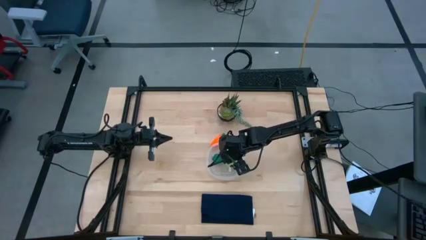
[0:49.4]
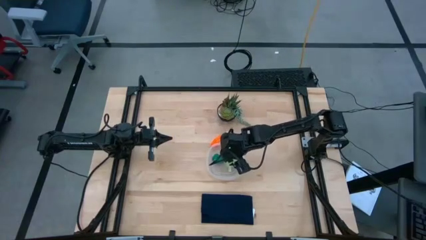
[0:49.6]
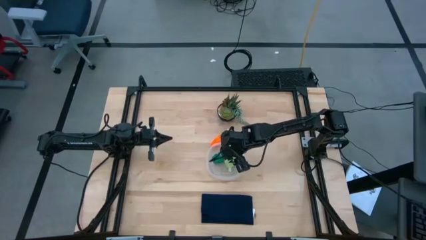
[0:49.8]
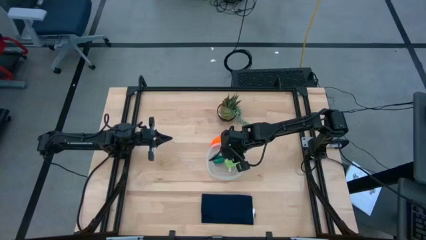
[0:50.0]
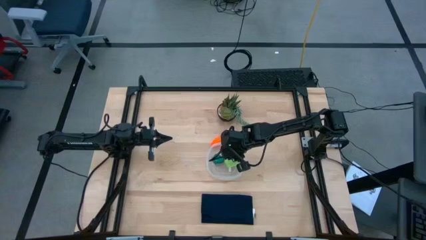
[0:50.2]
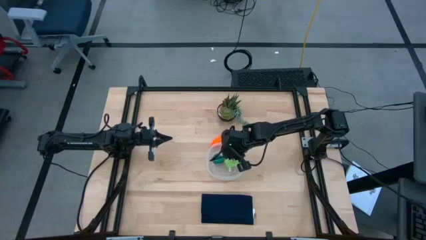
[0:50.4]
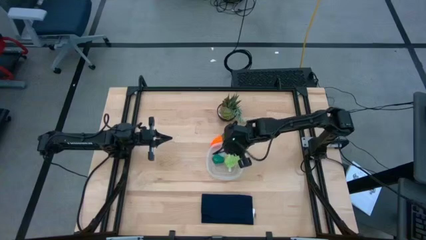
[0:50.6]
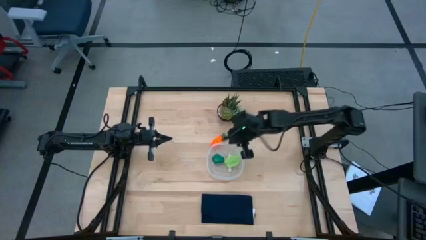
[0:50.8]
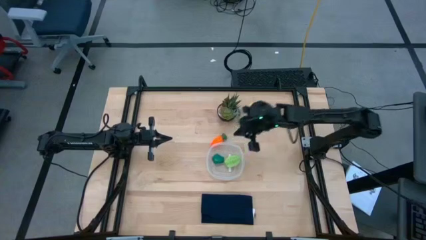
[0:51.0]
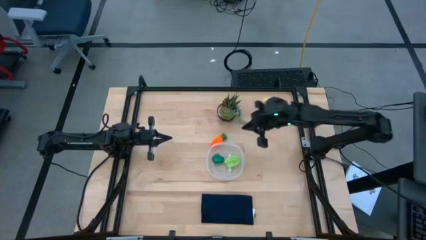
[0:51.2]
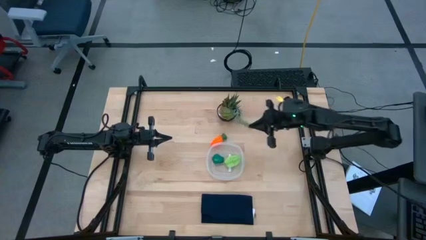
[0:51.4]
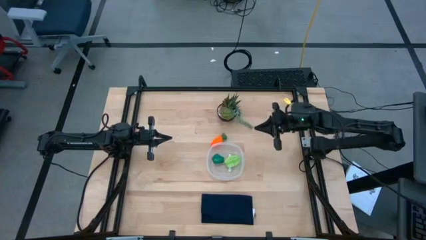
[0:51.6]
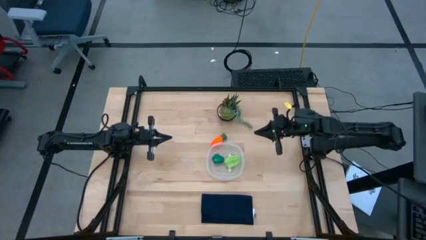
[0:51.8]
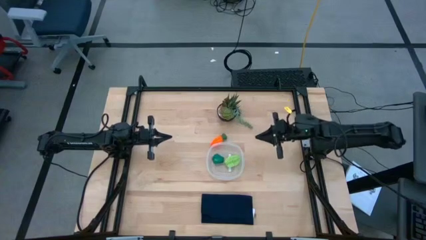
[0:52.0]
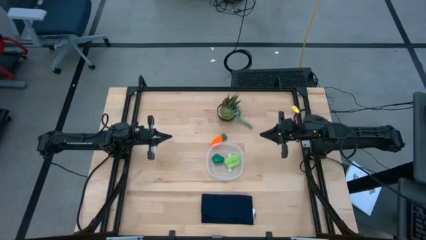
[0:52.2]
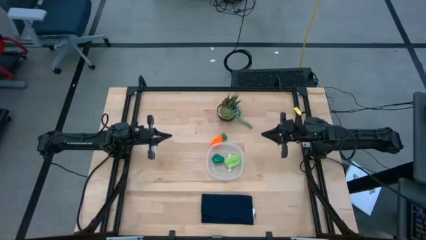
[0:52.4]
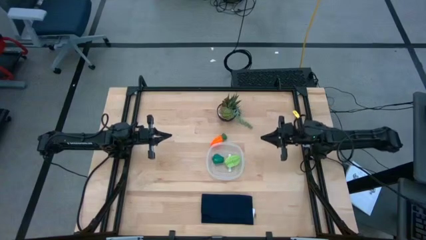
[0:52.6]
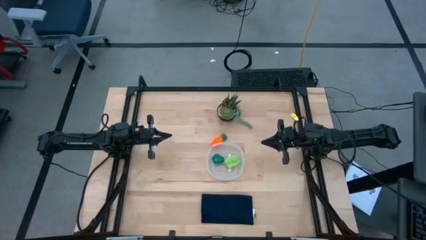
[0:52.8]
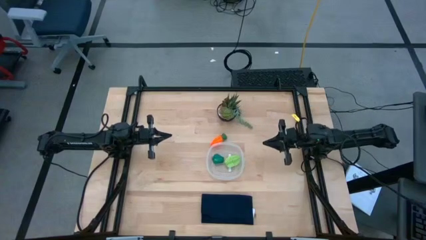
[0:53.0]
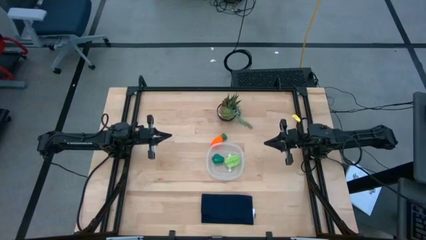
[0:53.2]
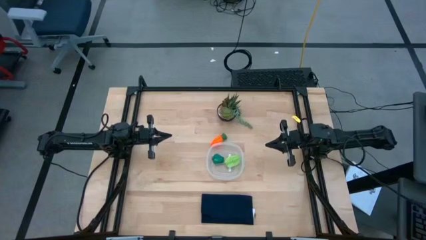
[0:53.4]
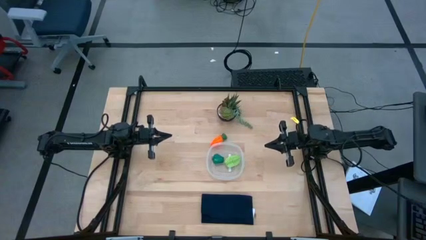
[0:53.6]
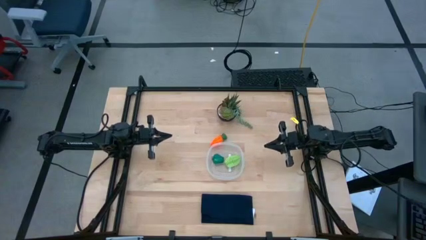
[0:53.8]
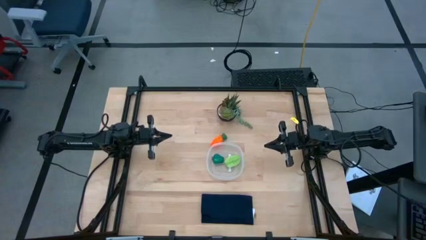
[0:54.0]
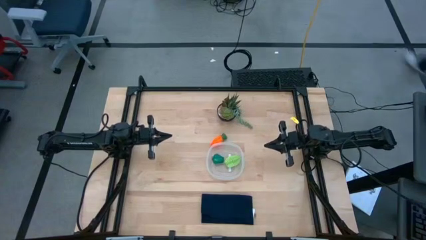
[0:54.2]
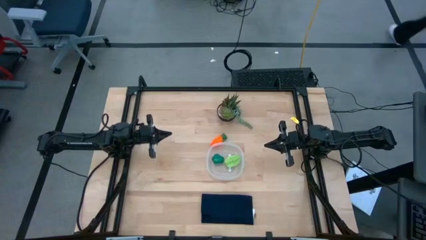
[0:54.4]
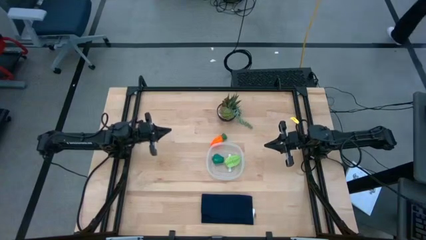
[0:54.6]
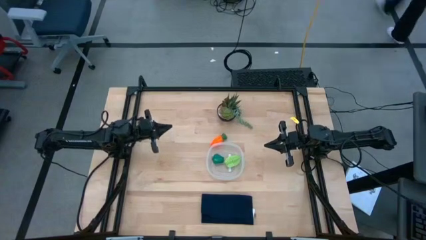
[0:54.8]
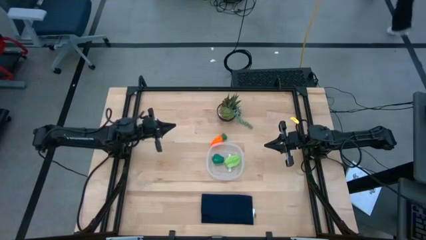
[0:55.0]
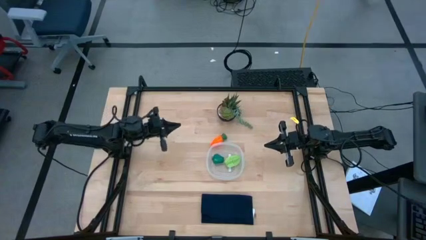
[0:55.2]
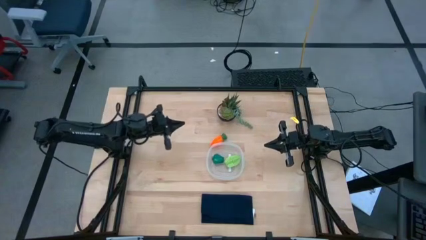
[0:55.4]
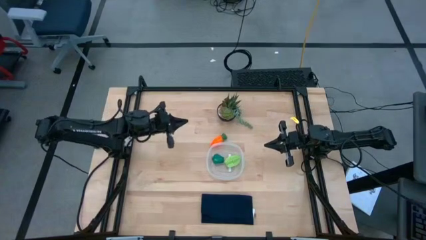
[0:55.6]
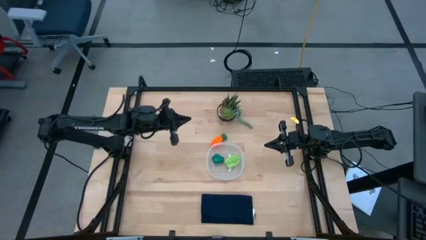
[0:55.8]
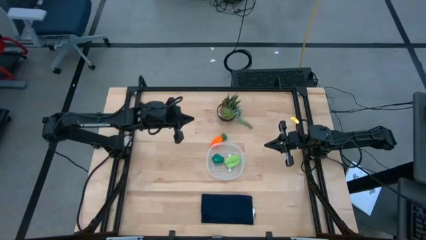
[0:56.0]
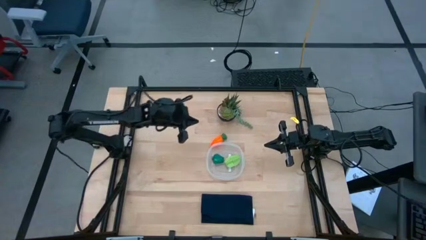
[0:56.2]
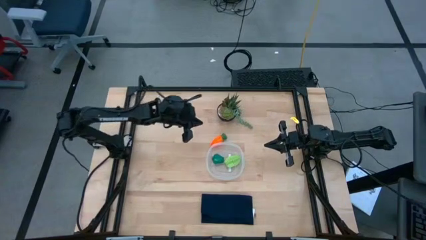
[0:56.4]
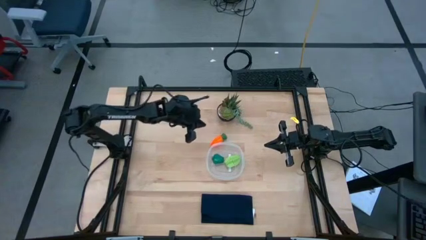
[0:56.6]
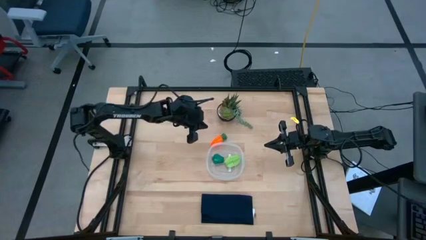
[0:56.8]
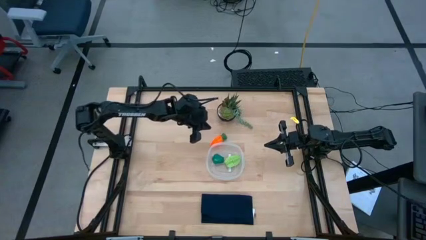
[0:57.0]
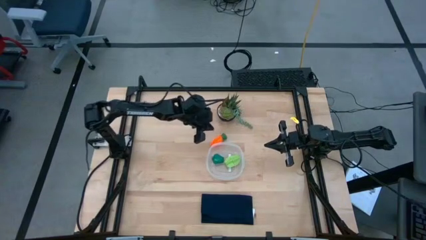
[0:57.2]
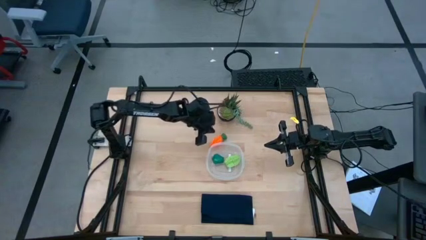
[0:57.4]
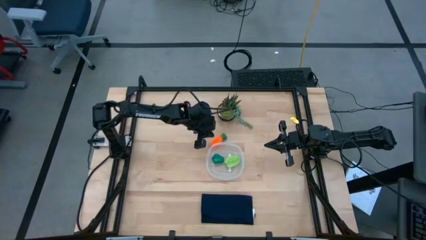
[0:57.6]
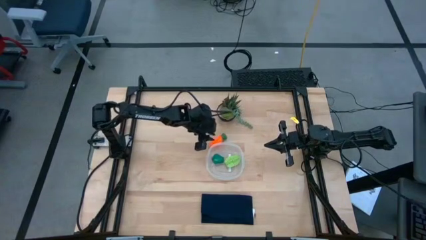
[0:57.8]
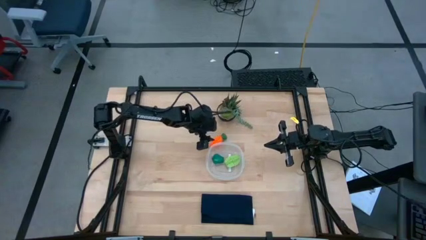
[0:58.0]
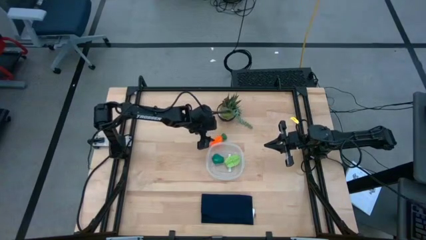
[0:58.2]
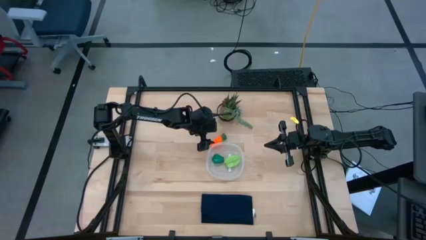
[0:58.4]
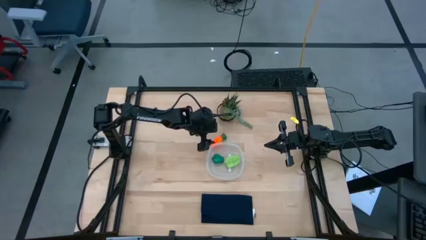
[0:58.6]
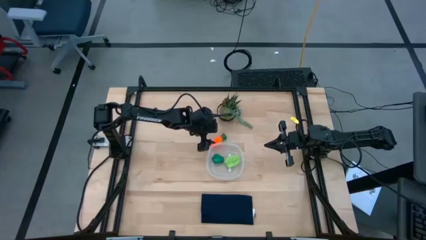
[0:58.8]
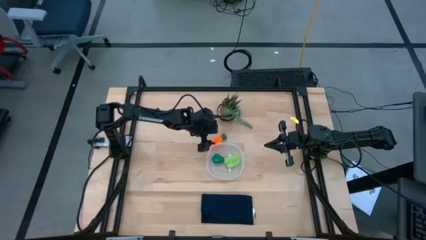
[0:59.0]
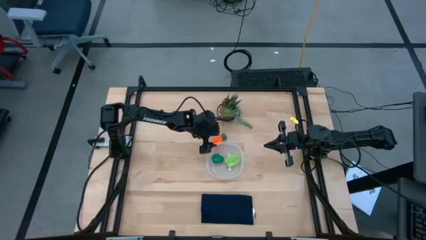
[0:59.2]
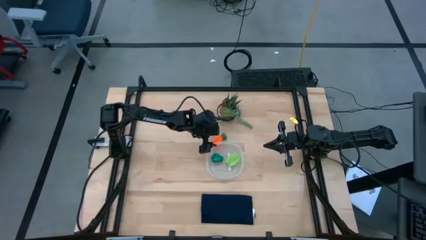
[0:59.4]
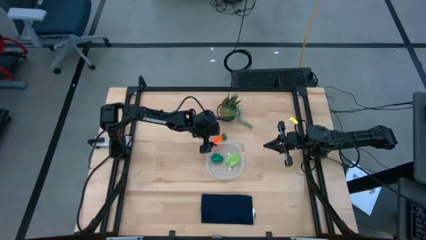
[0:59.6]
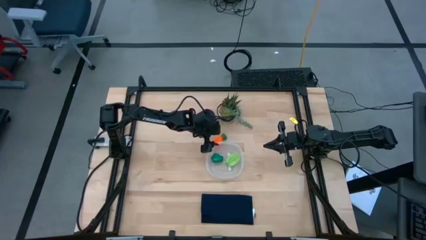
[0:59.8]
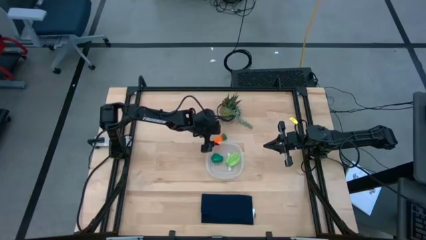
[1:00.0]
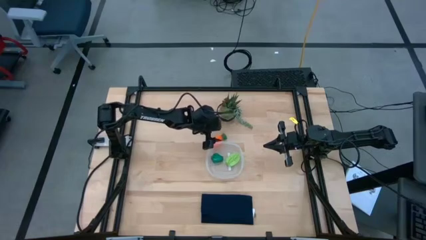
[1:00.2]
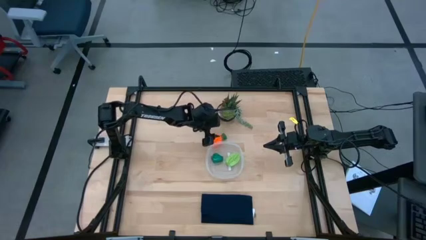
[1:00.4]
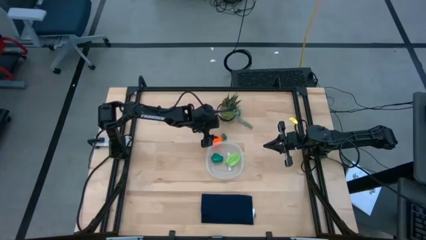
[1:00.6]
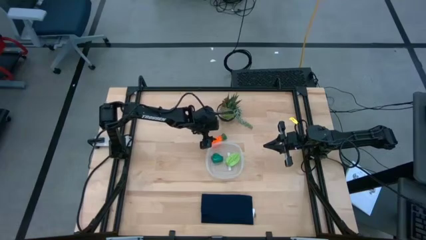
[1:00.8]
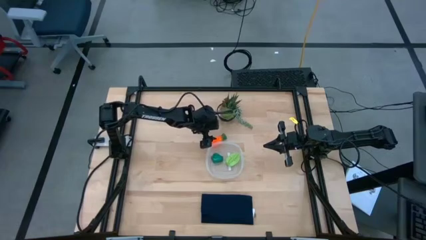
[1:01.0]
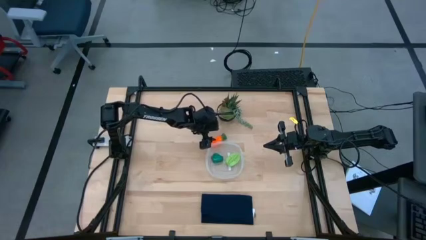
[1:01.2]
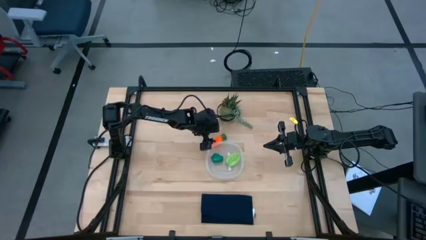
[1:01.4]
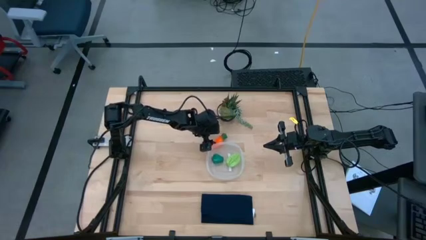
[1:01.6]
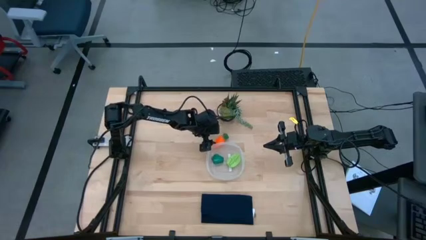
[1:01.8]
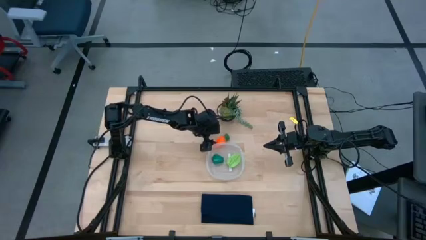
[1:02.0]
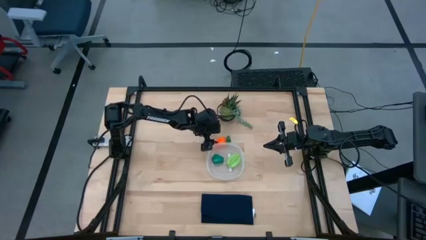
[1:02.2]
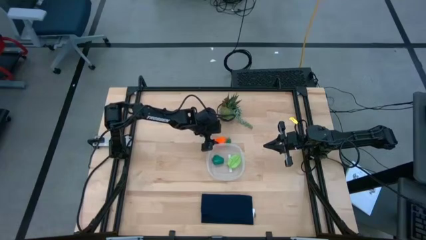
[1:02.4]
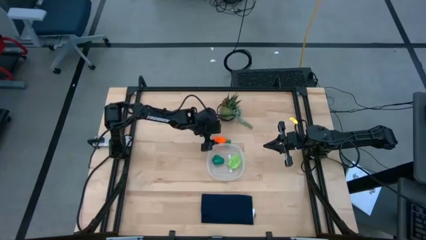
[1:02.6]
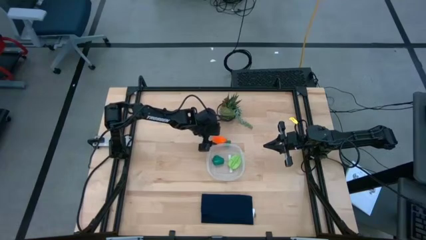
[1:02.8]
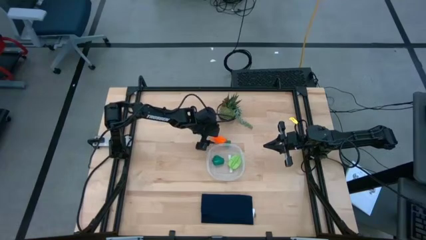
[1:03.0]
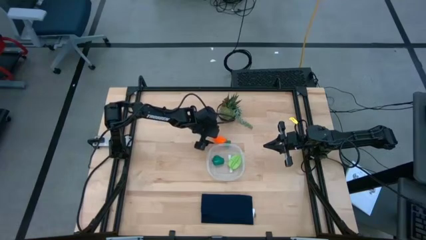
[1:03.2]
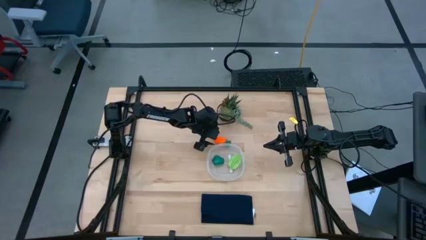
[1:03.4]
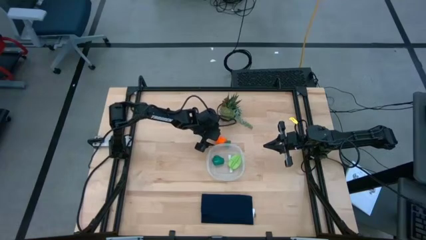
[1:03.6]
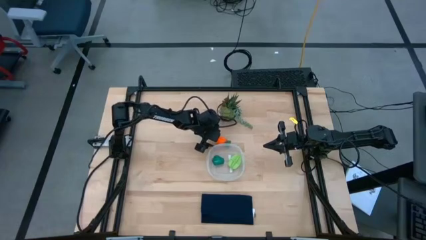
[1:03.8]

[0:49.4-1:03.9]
Task: Pick and placing Produce into tupperware
Put the carrot into the transparent bin
